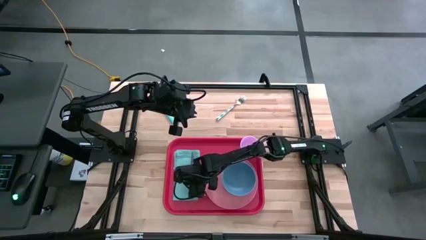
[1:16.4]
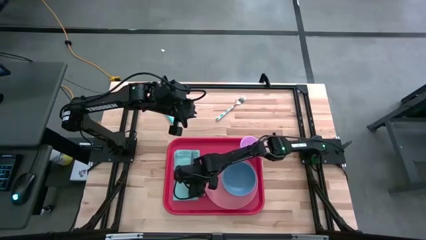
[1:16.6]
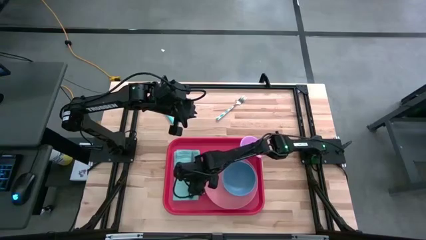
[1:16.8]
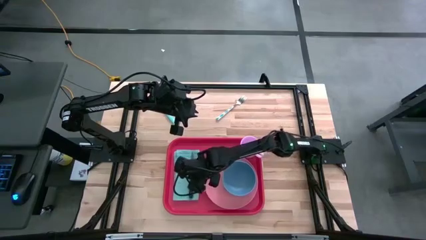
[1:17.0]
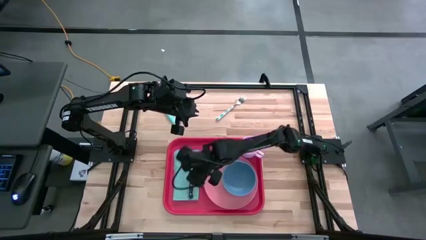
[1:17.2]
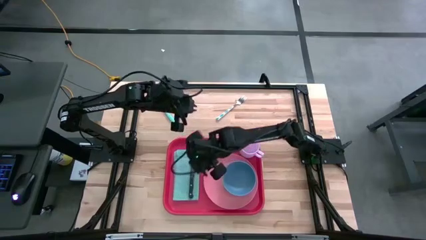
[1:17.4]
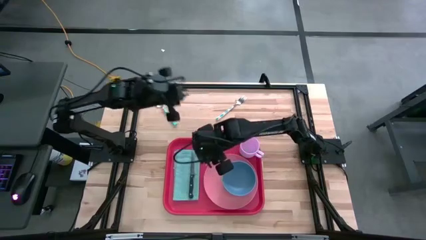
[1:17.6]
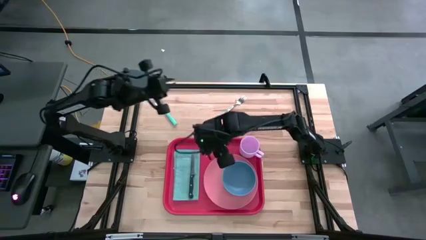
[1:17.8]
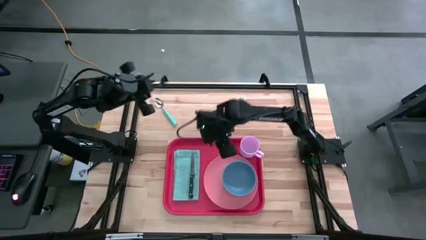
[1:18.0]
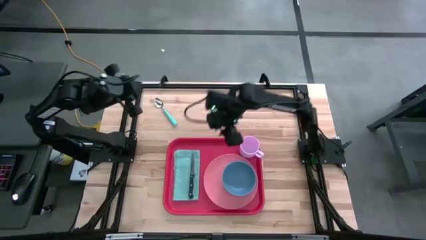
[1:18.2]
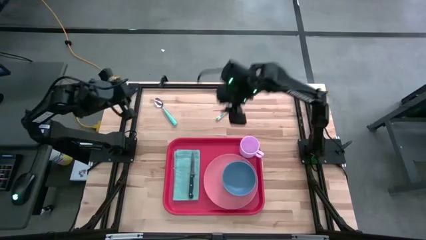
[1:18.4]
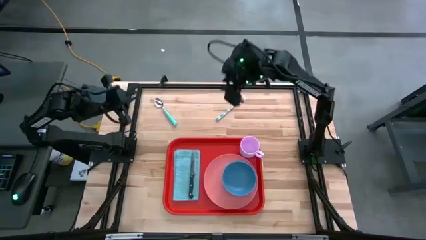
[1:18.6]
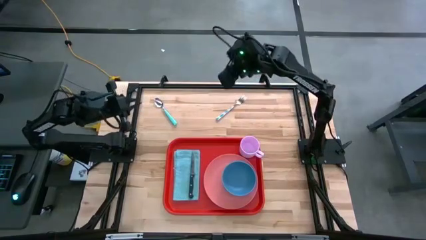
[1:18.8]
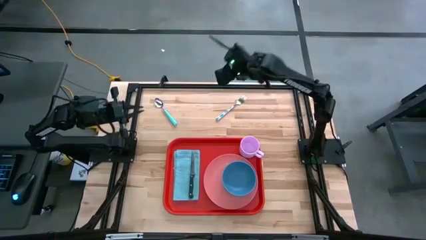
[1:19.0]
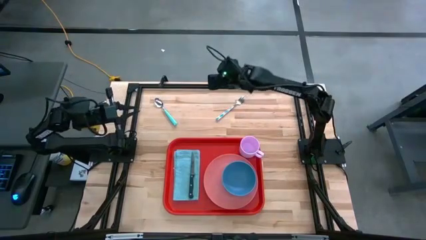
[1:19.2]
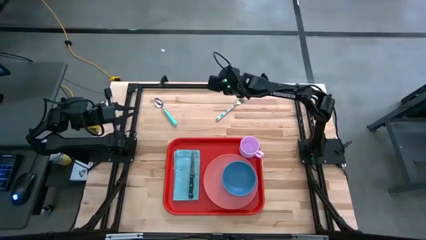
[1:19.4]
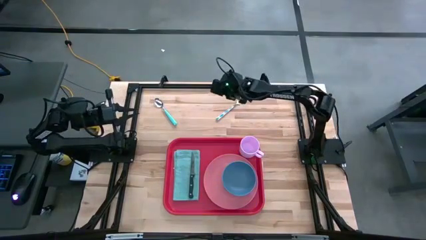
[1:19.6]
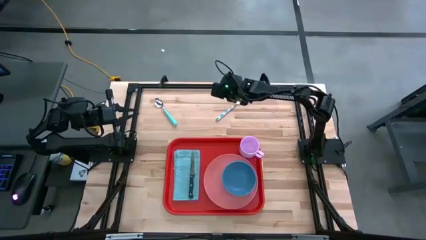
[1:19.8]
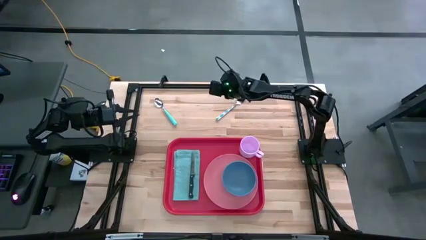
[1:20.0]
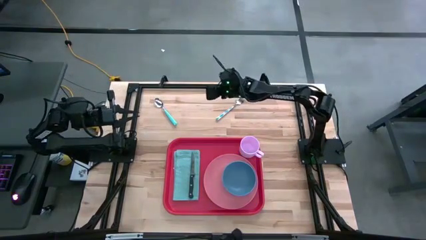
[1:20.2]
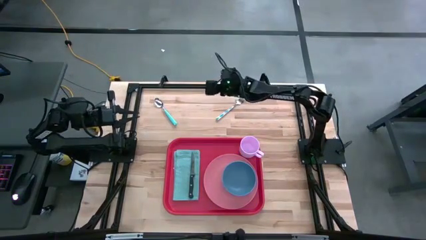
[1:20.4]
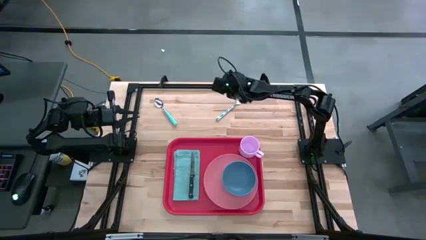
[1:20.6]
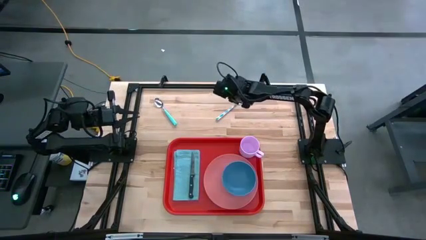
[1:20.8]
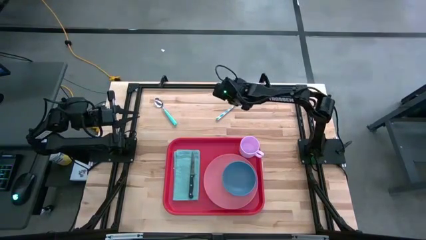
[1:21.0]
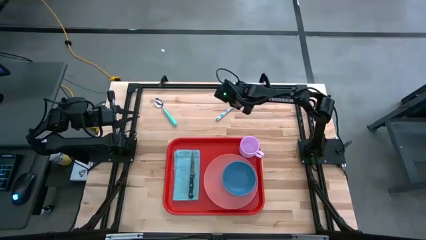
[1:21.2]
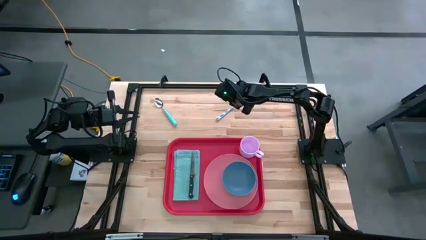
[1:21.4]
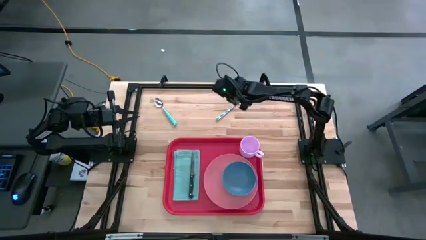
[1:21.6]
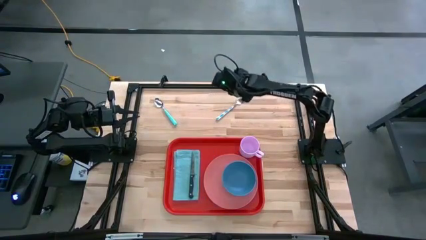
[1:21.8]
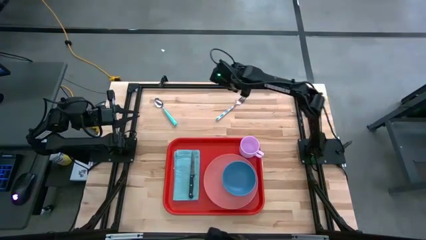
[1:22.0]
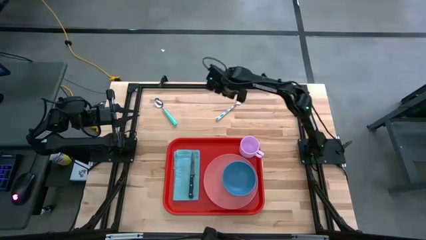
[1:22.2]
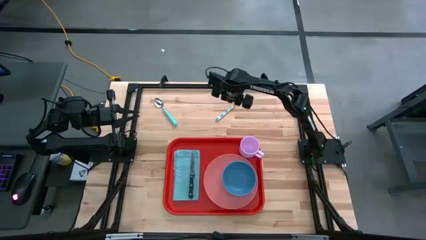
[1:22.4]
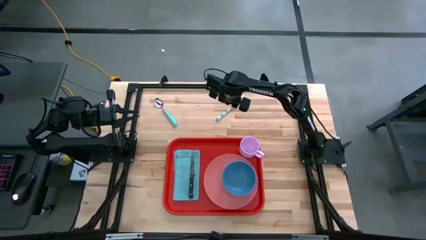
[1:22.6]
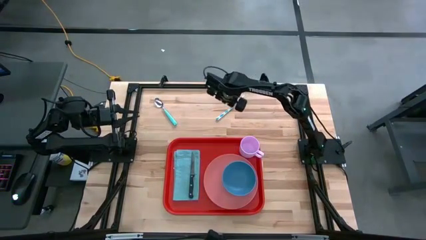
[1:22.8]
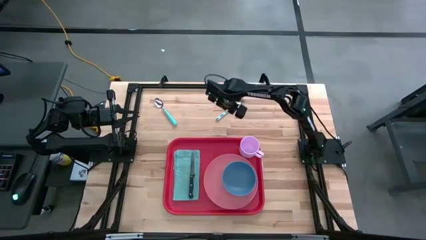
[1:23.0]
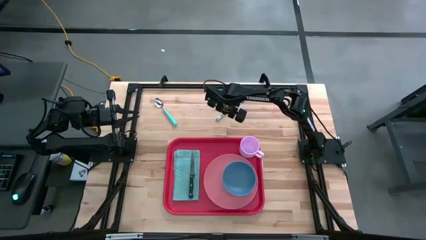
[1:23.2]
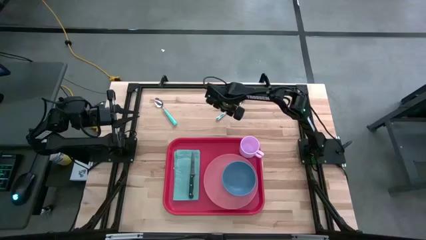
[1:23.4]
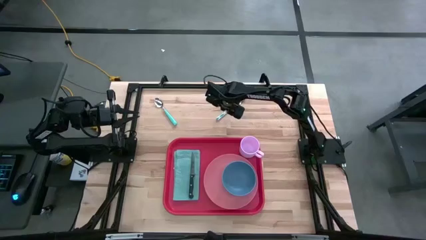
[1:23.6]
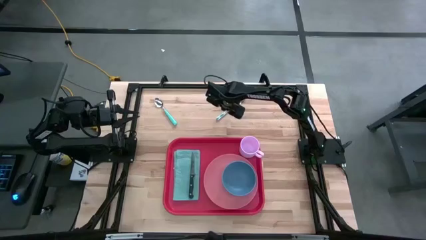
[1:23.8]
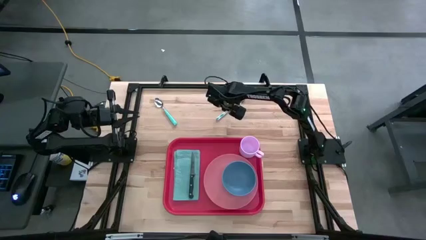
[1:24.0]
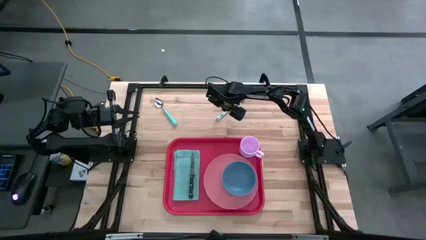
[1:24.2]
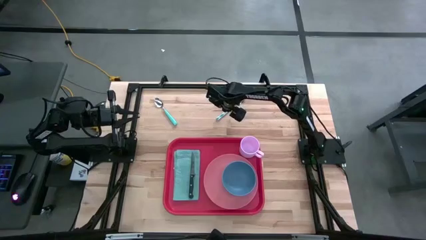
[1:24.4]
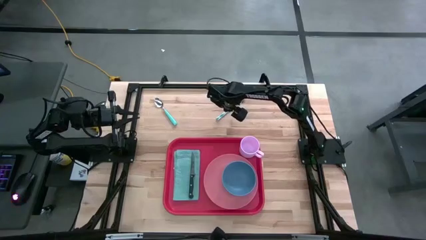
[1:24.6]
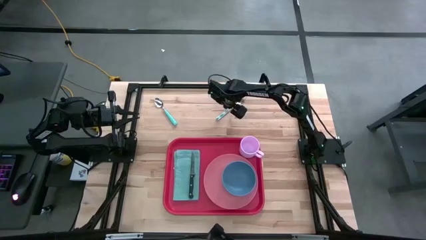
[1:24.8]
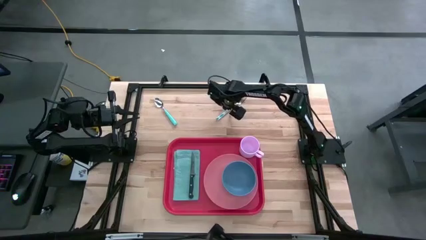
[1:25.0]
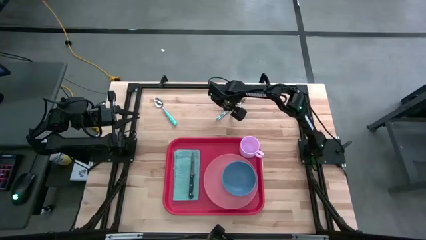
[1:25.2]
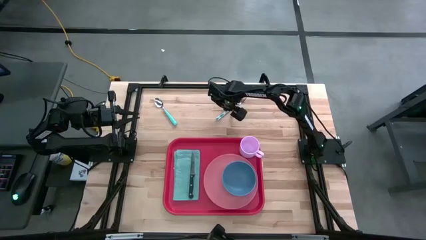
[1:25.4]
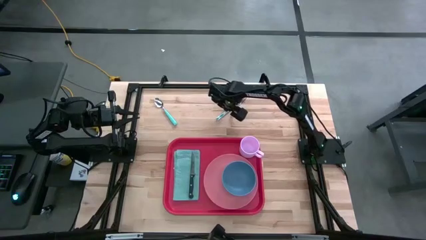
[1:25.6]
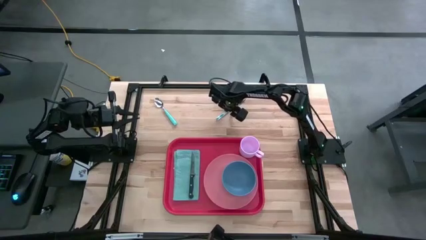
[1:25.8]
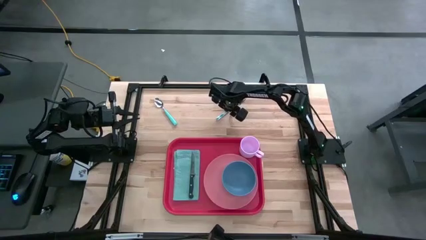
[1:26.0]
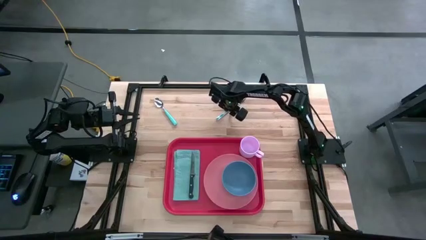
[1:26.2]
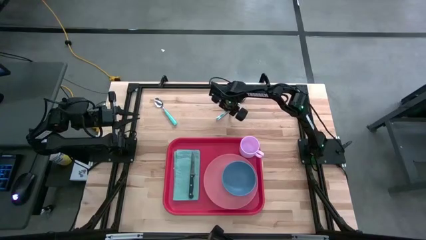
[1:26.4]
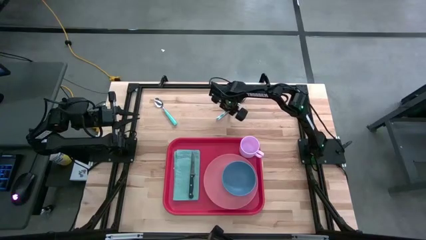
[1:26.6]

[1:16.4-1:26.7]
Task: Set up tray
Put the blue fork on the blue napkin to the left of the black knife

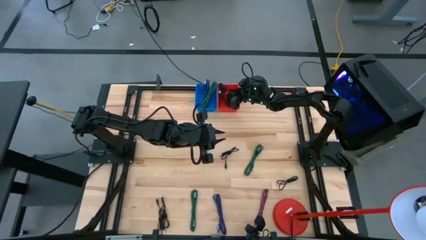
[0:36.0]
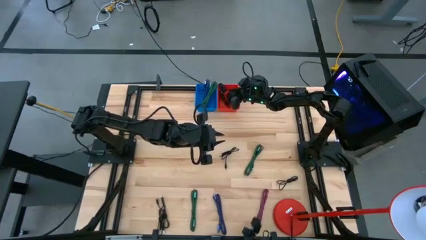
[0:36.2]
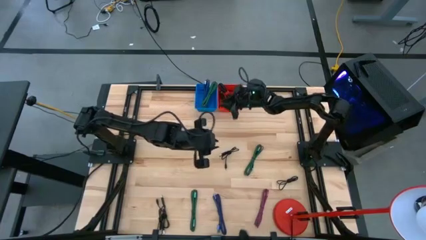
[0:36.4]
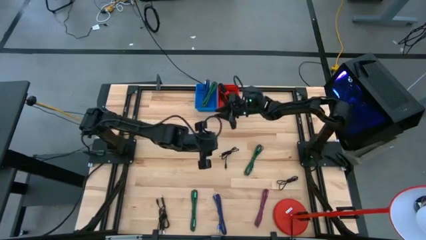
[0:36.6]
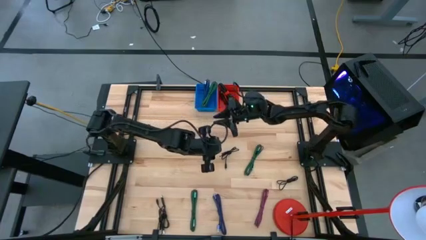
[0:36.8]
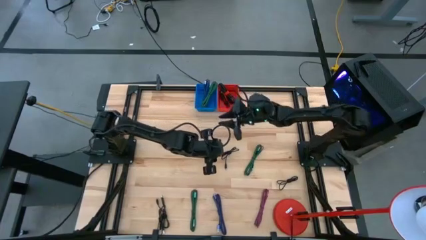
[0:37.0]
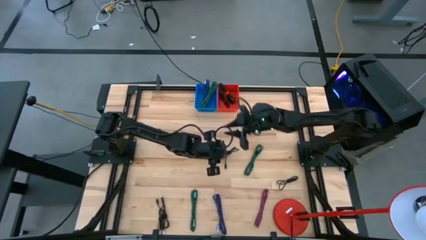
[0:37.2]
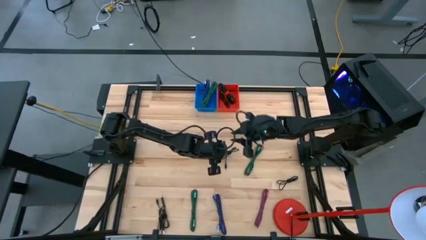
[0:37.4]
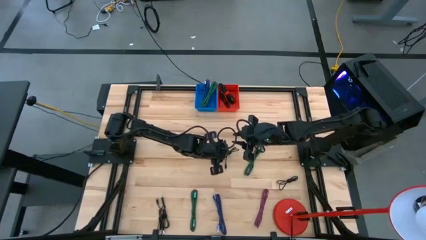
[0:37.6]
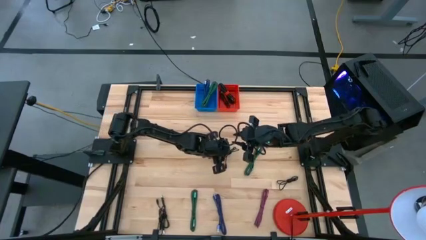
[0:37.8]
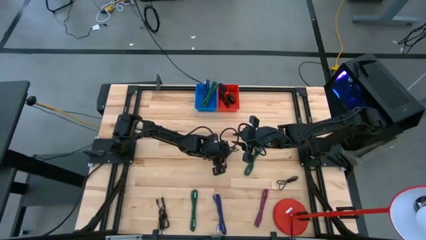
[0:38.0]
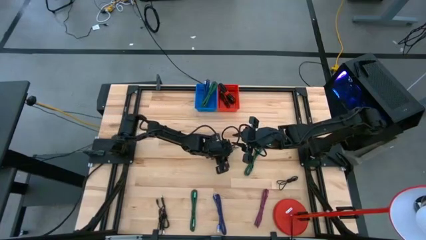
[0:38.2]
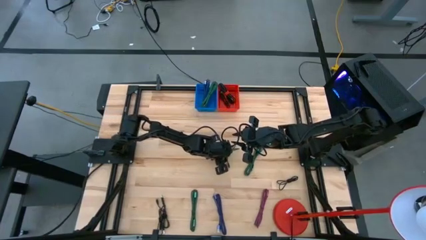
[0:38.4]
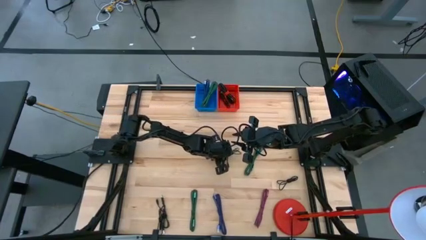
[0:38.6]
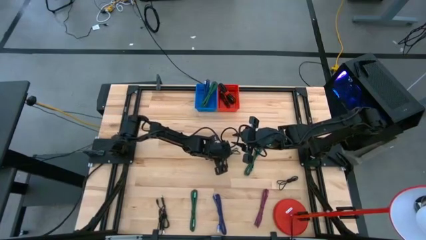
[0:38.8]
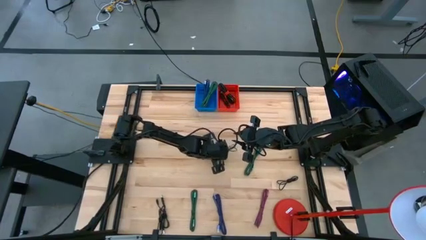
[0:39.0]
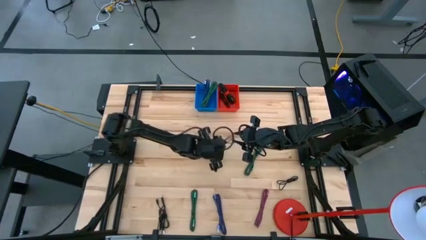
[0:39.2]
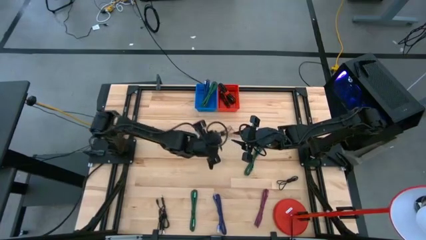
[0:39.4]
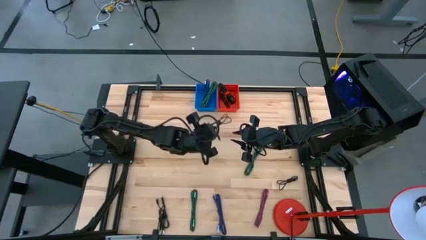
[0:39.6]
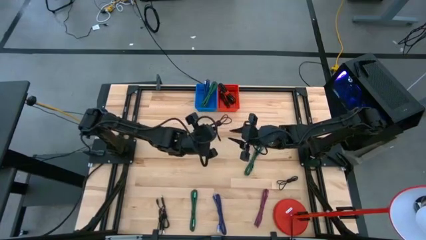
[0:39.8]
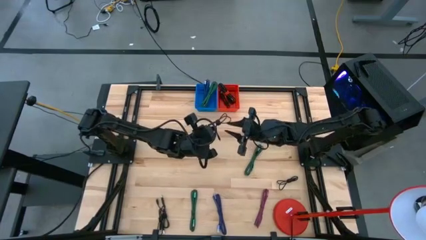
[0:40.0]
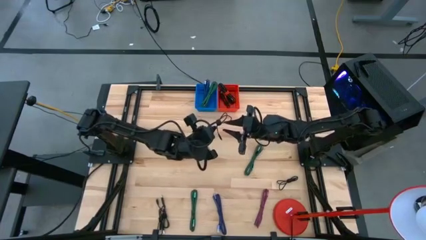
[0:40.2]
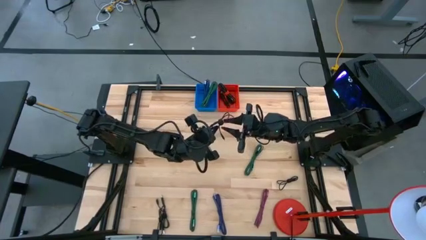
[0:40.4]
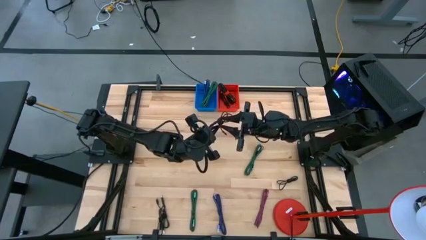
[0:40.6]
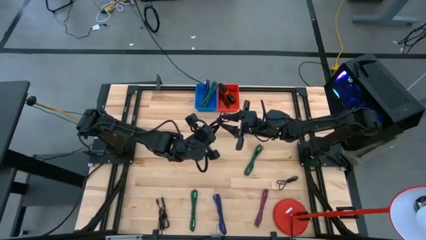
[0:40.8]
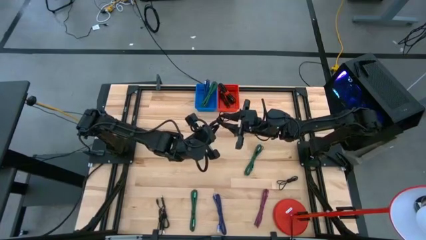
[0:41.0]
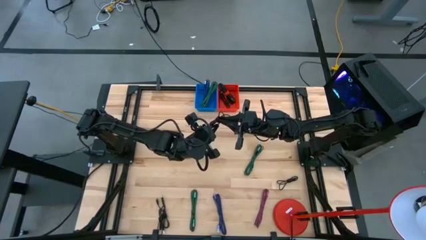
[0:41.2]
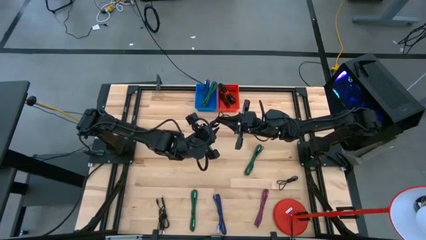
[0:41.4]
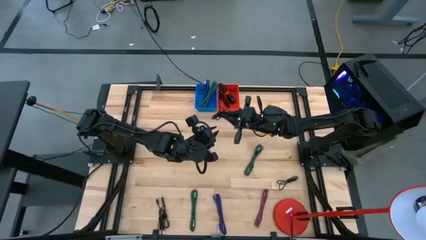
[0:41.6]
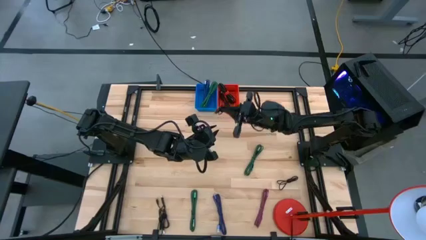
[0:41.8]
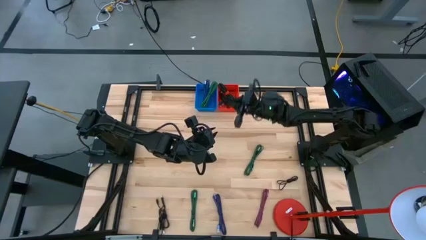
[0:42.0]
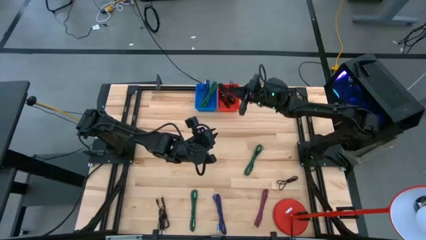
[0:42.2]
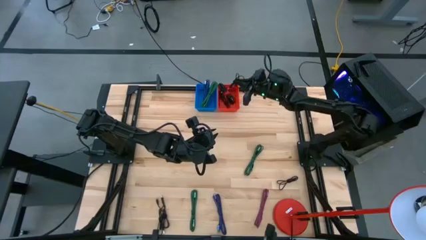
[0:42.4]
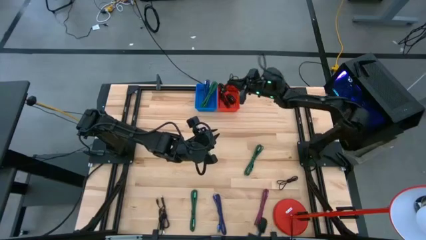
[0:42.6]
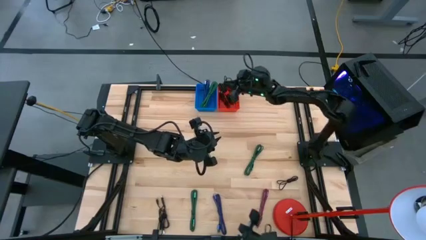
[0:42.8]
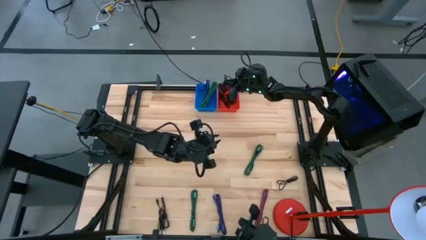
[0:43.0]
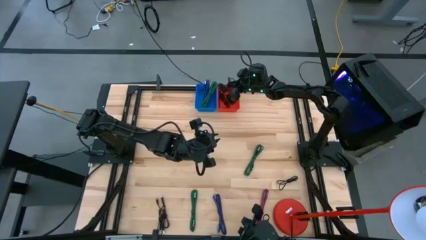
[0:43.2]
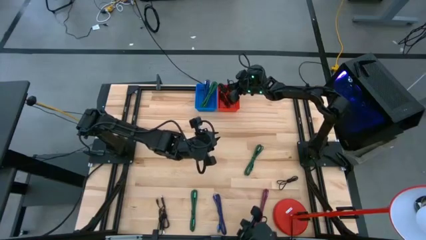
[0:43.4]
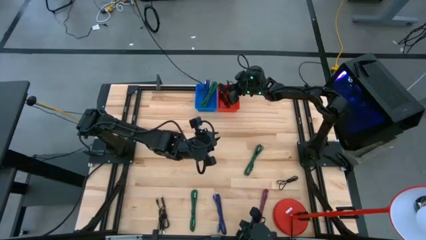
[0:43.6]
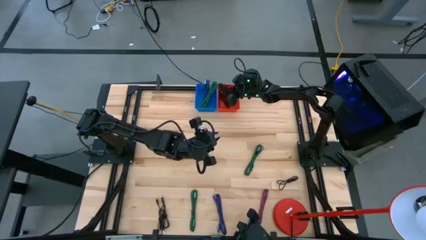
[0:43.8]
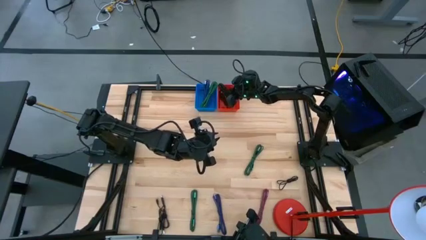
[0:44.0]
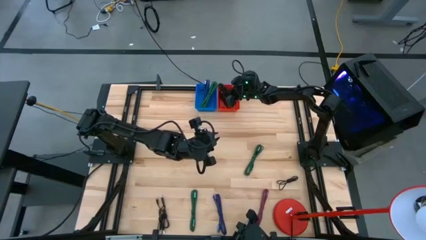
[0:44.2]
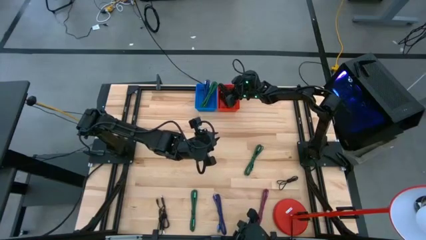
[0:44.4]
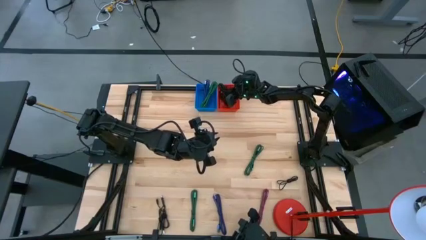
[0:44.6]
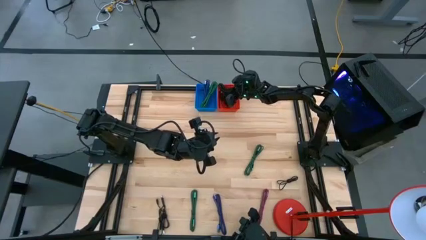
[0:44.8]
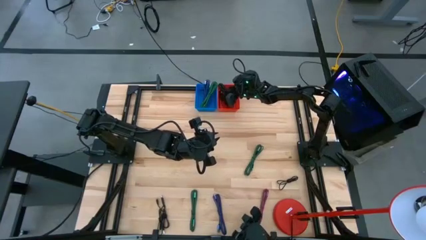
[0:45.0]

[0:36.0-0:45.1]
Task: Pick & Place USB Port
Put the black charger cable into the red bin
